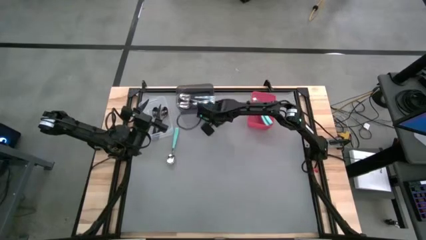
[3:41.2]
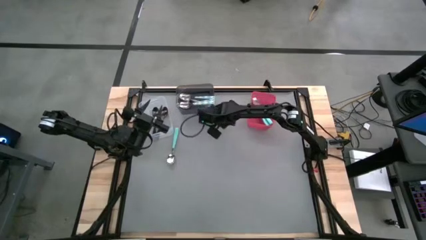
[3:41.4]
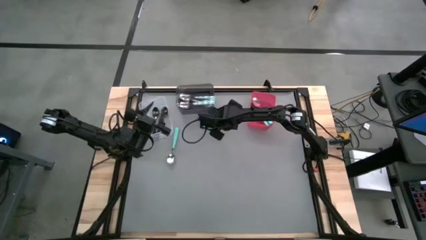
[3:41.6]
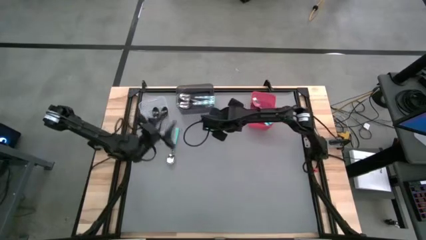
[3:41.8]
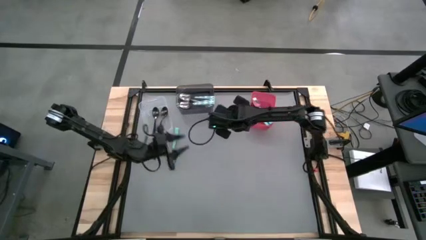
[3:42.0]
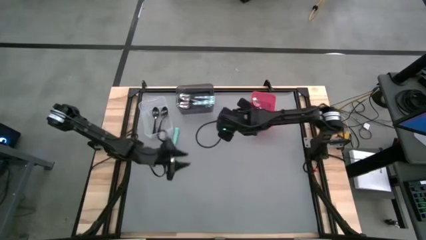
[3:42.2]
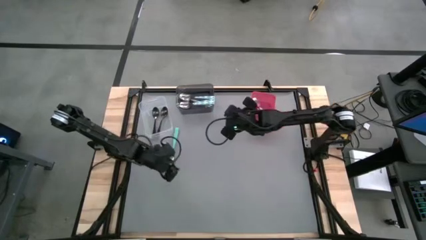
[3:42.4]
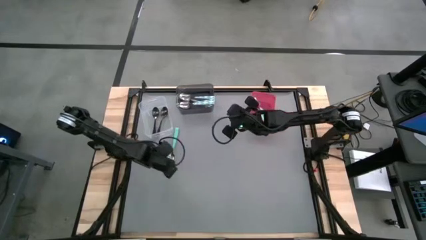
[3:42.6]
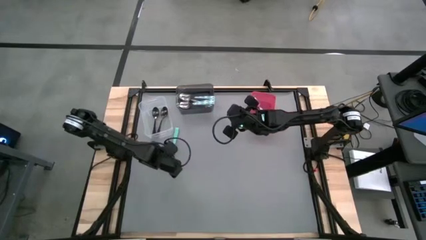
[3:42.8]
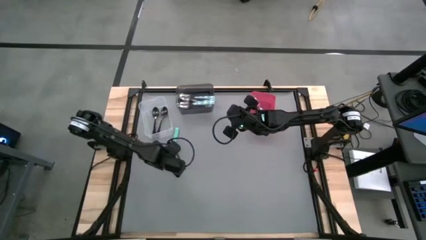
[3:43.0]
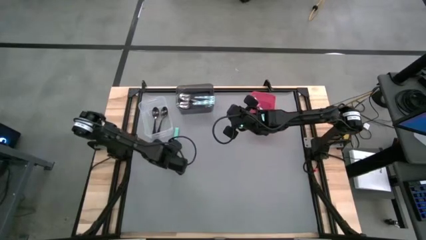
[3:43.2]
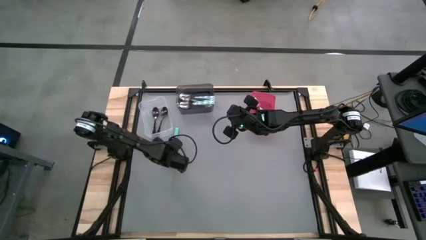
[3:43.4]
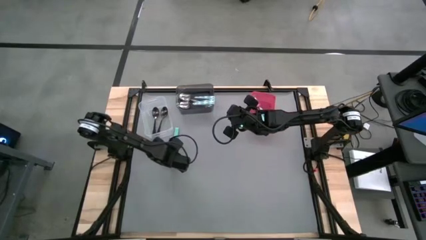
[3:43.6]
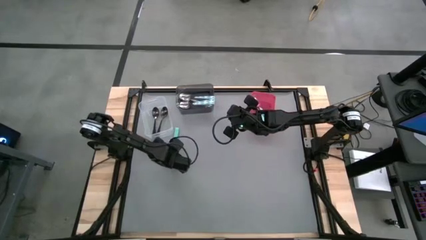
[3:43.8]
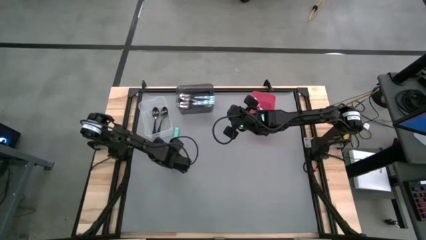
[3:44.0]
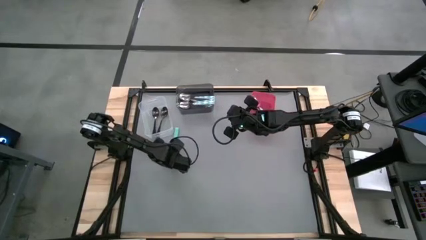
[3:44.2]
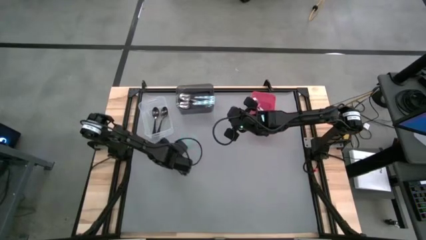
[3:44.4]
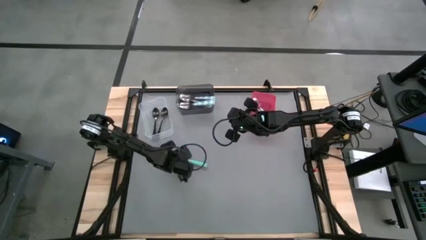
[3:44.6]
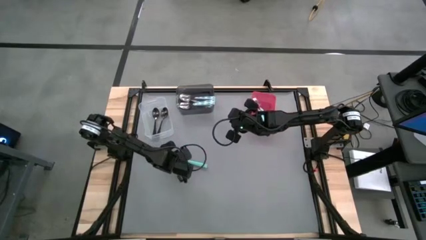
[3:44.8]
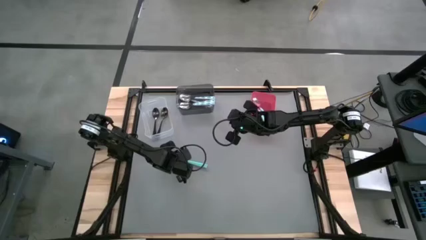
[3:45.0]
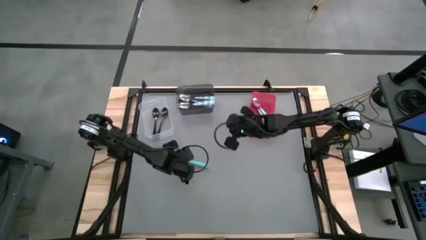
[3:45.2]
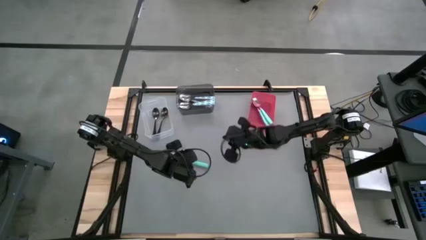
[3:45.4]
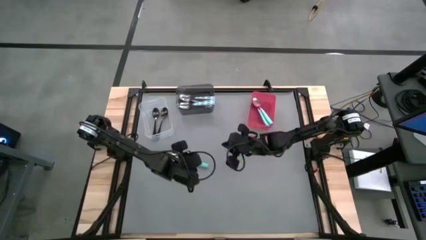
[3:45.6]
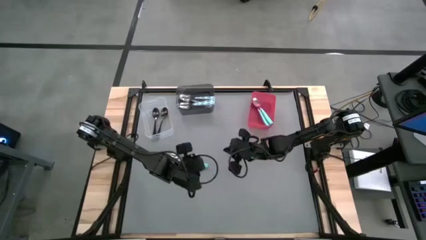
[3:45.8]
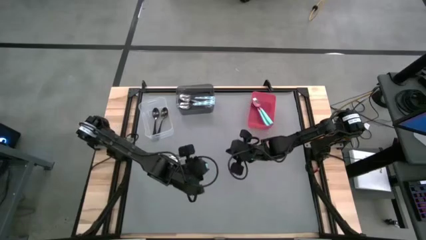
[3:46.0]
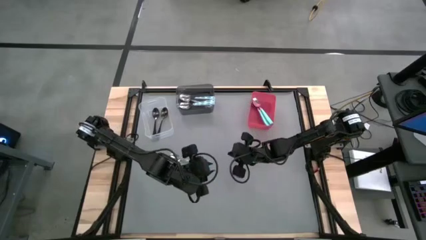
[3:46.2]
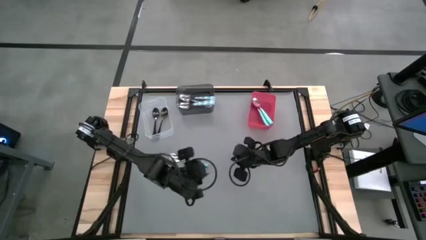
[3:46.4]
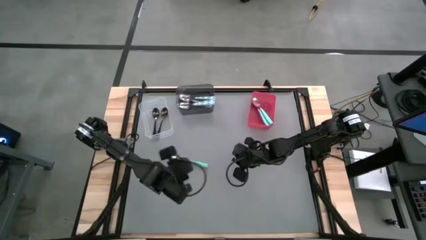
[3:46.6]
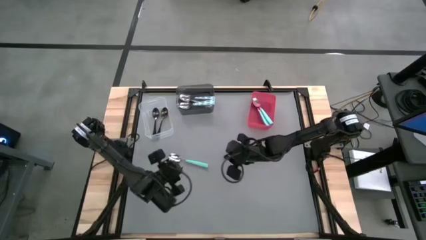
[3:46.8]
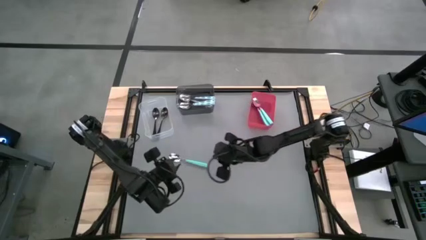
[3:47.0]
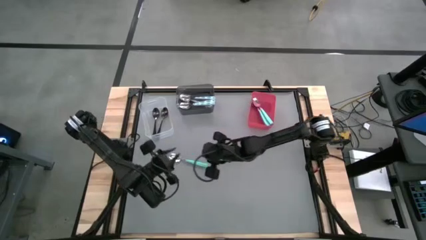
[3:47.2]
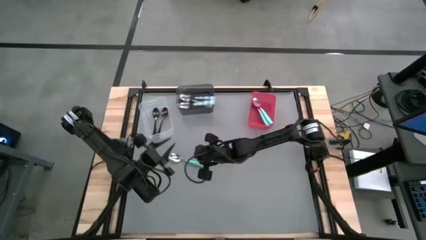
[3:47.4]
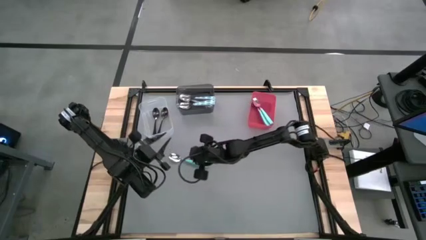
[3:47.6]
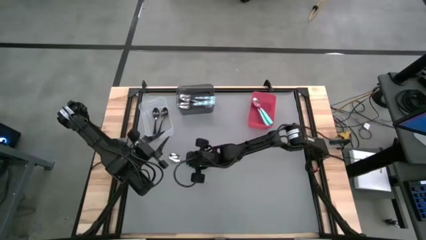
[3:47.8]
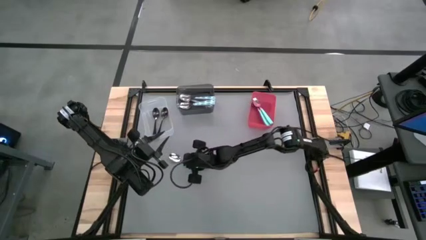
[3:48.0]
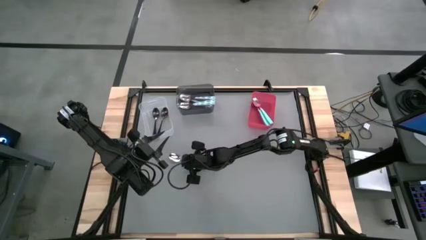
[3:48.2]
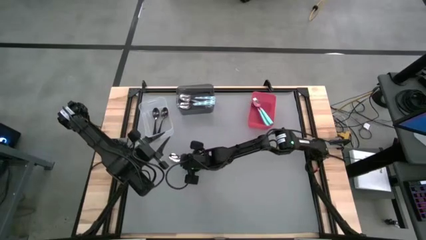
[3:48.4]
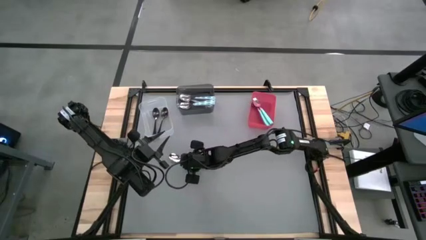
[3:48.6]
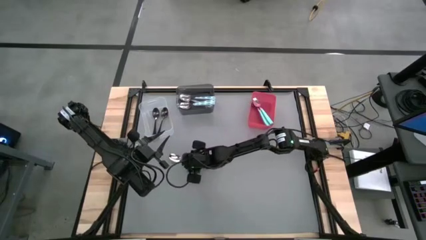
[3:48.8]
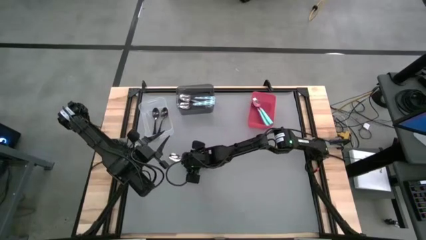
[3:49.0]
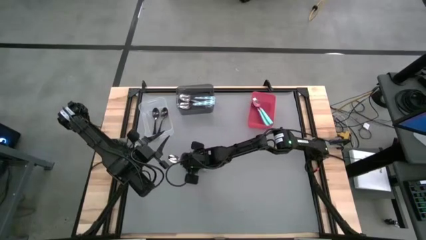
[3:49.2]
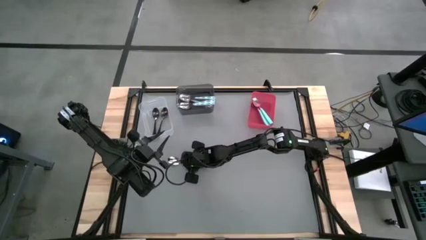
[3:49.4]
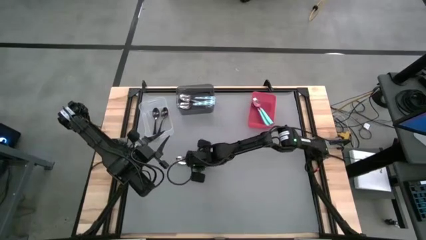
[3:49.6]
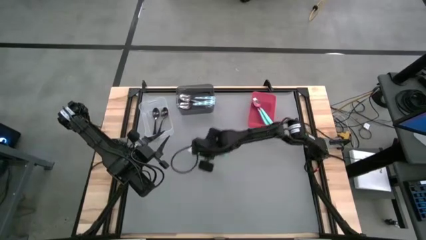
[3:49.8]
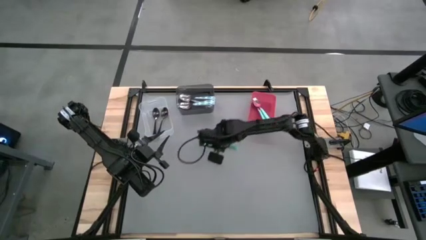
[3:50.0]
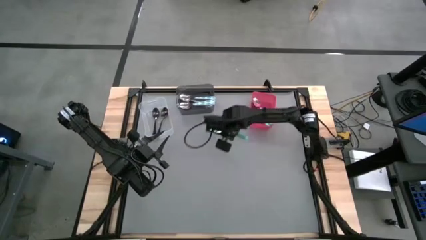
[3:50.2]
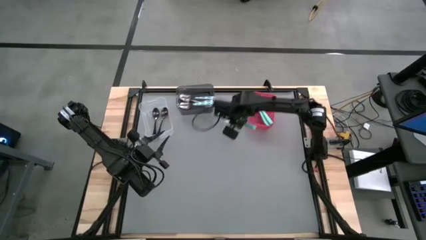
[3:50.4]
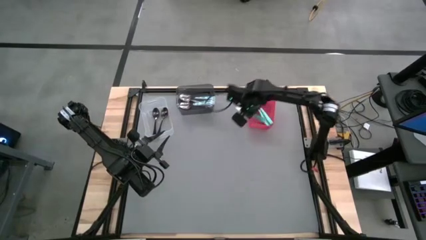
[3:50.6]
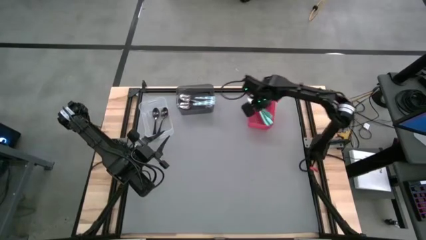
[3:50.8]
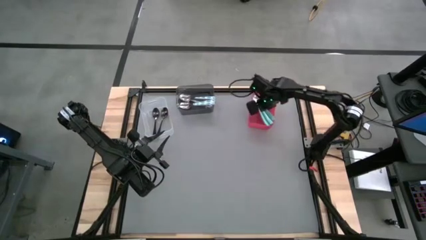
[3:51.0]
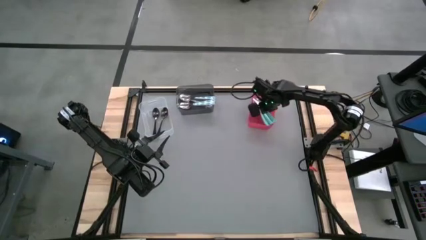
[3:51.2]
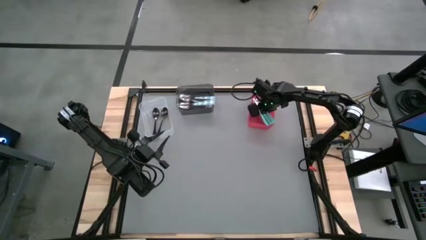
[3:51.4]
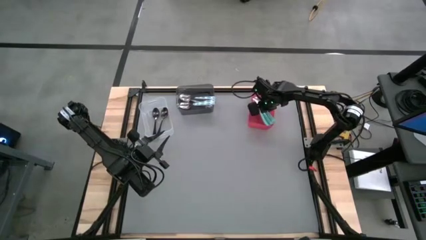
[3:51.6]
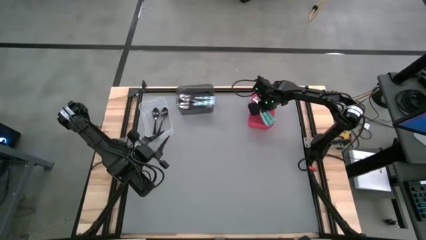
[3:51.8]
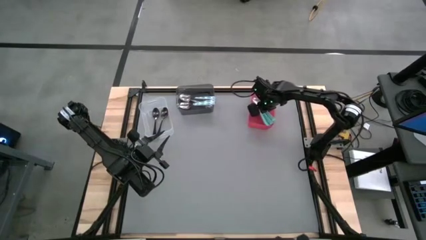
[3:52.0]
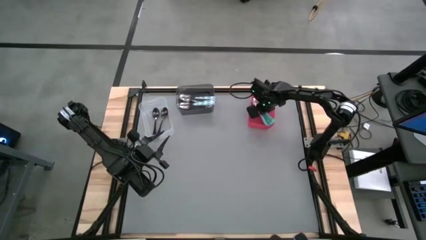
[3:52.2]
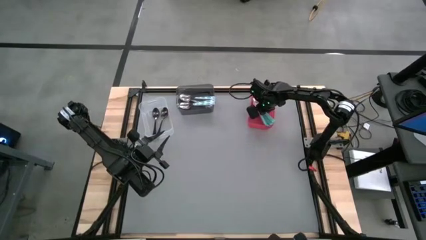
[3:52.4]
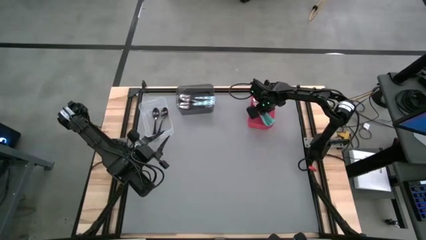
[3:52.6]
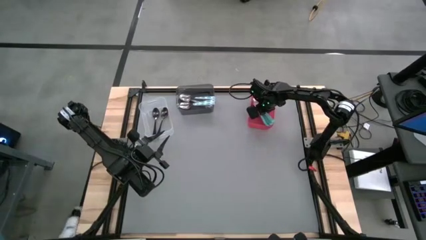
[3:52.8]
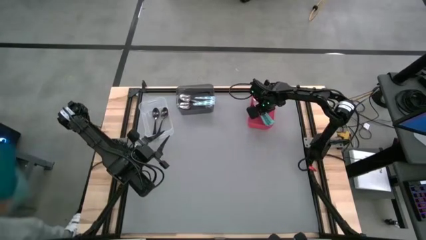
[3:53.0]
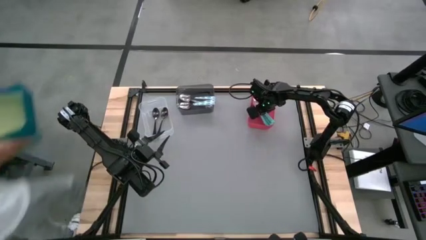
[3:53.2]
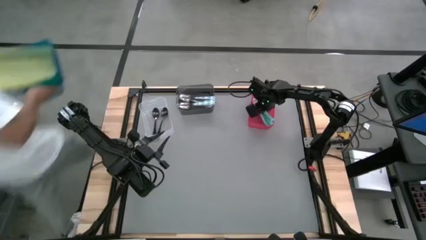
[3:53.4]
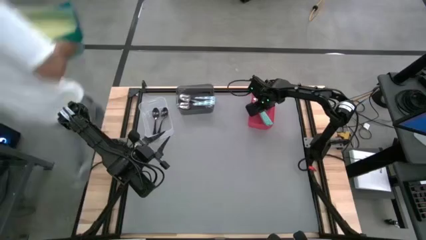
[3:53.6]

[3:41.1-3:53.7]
Task: Sort silverware by color (type)
Put the green spoon into the red bin

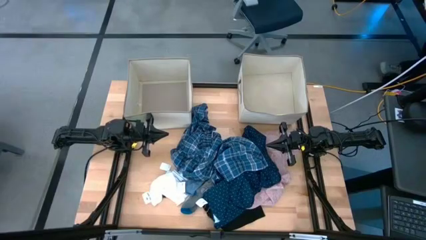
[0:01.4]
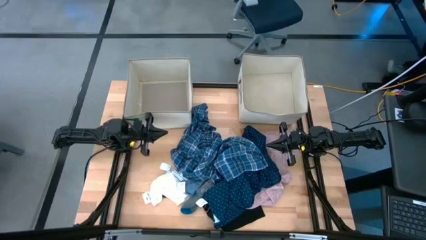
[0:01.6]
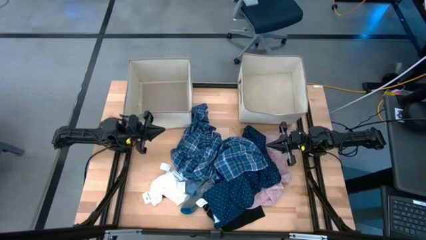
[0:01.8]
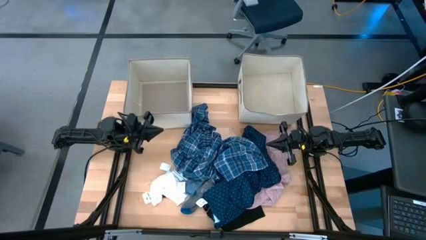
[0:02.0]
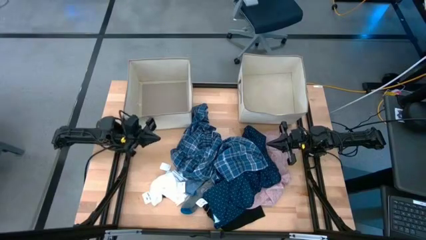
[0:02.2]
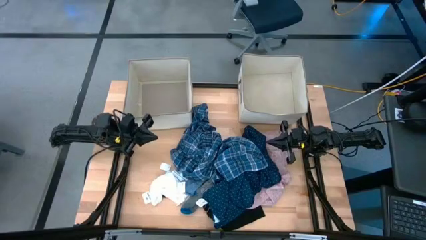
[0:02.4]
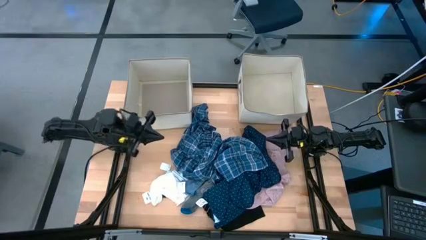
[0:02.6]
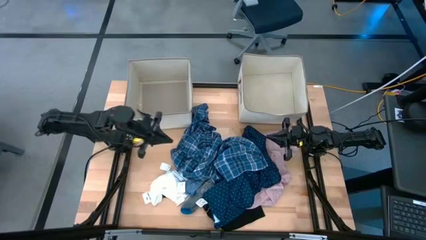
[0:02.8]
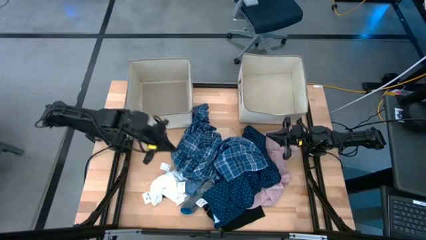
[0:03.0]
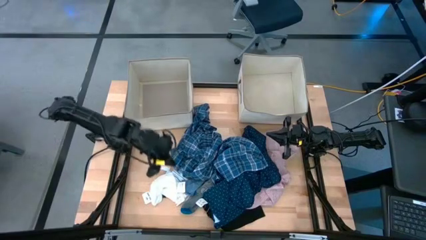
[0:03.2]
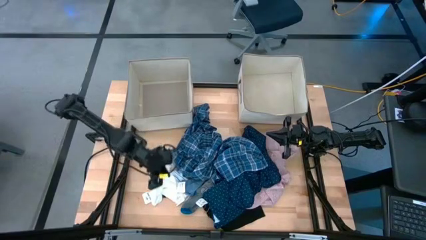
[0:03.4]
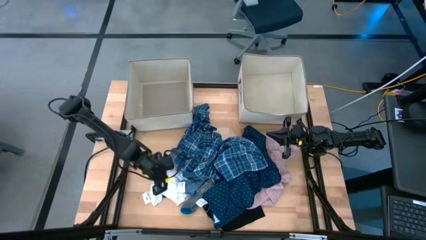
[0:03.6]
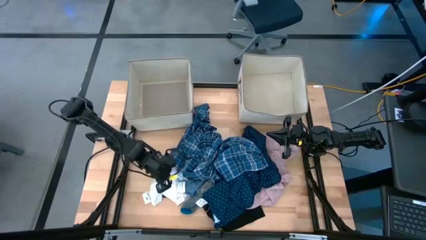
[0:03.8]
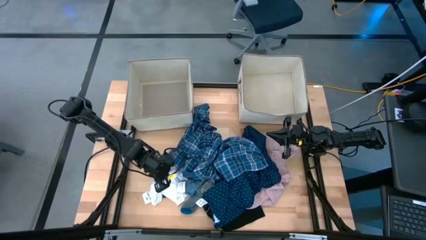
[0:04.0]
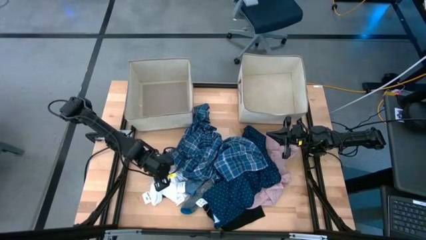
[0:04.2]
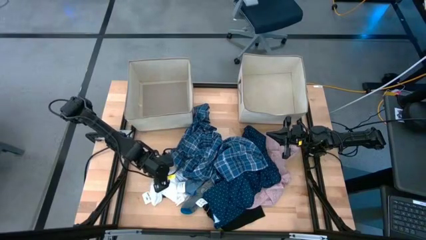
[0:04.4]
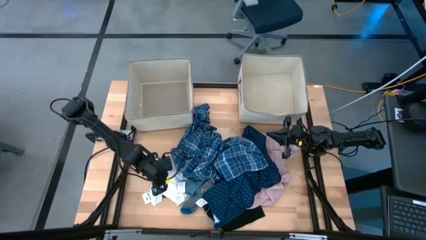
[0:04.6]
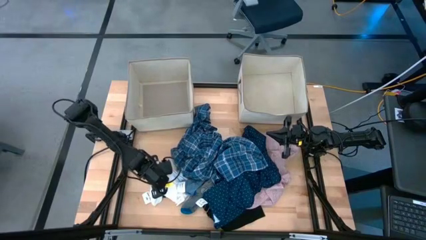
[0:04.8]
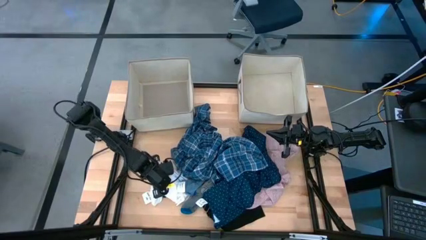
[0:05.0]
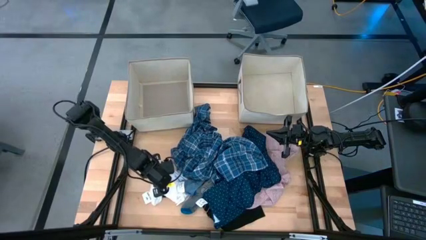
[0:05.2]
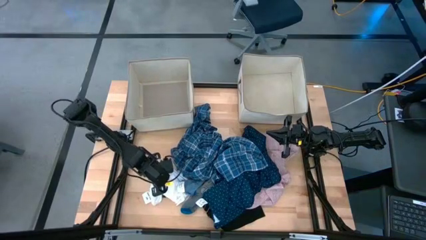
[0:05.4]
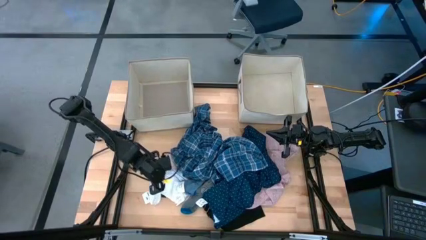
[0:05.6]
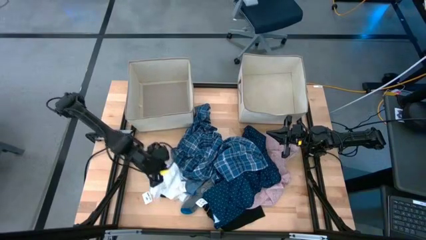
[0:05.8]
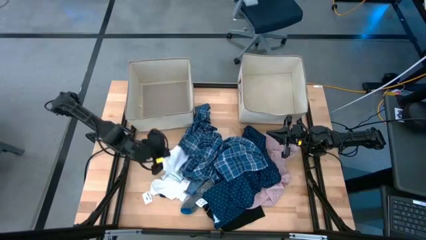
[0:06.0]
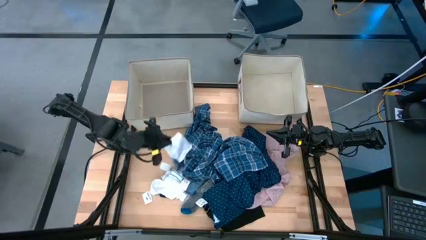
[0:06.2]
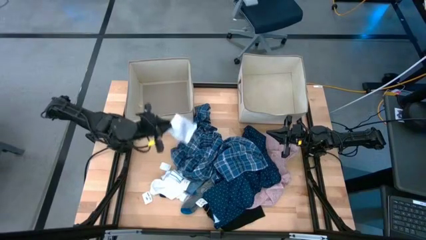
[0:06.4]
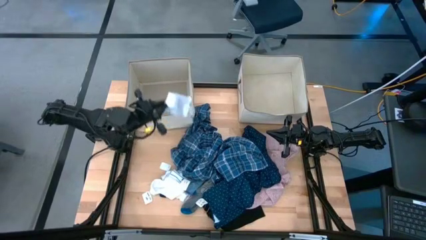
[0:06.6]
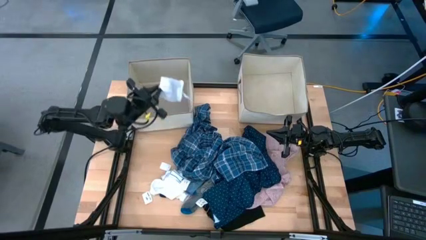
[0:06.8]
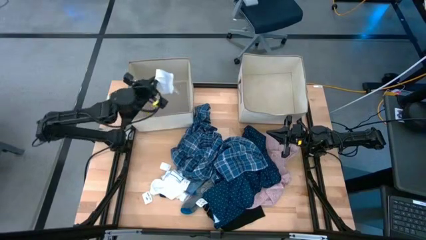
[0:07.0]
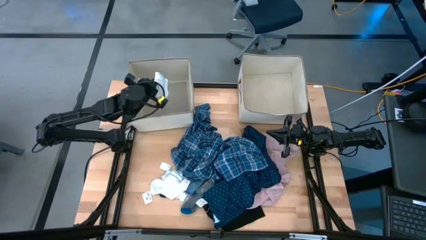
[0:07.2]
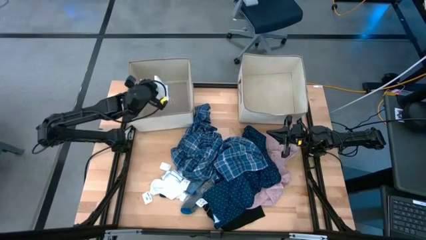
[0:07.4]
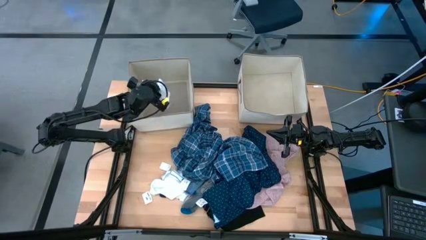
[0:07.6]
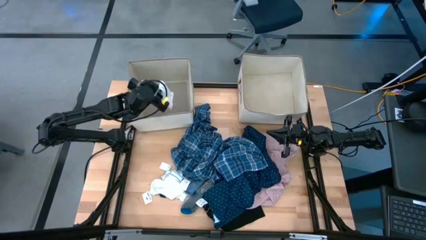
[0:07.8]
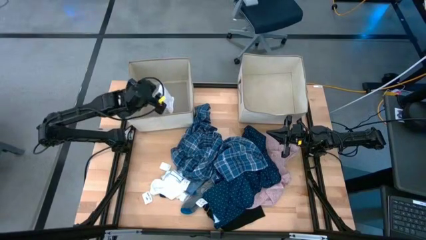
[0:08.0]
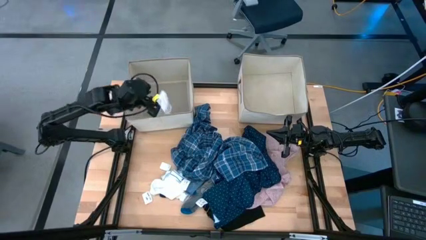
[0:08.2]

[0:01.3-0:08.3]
Task: Sort clothes
Put the white sock into the left laundry bin
